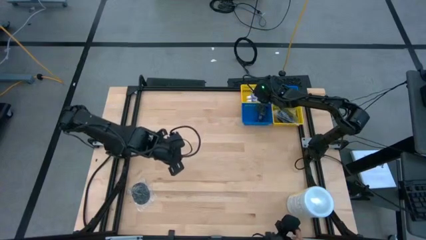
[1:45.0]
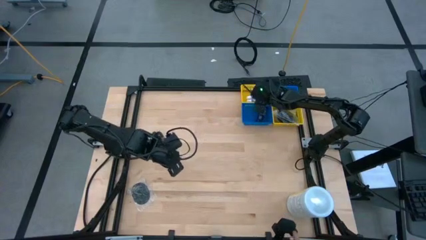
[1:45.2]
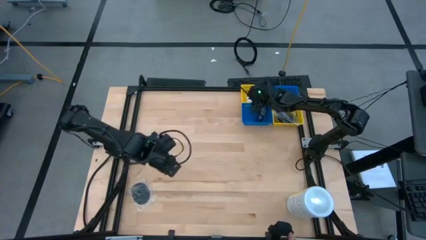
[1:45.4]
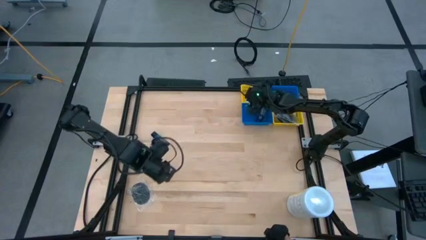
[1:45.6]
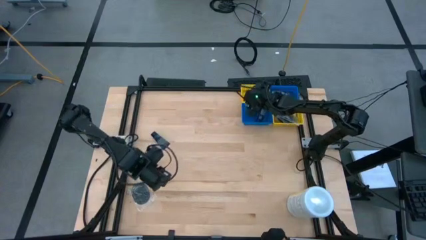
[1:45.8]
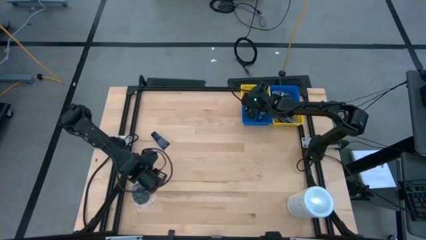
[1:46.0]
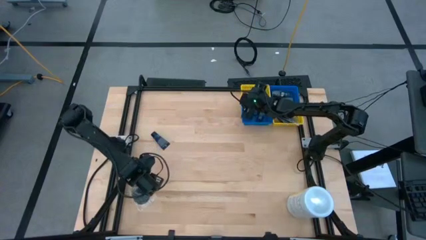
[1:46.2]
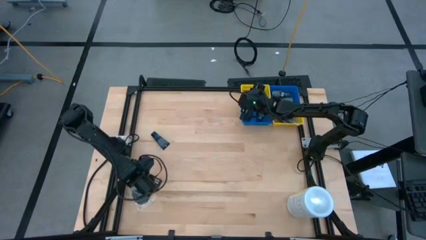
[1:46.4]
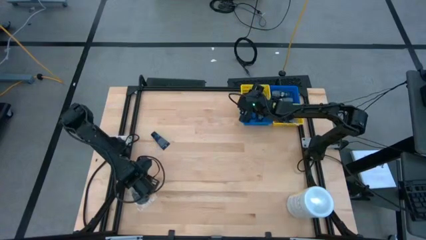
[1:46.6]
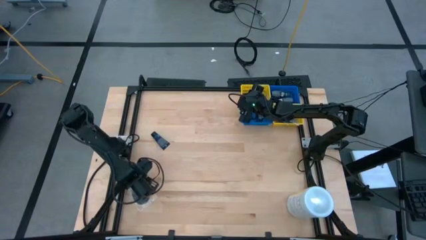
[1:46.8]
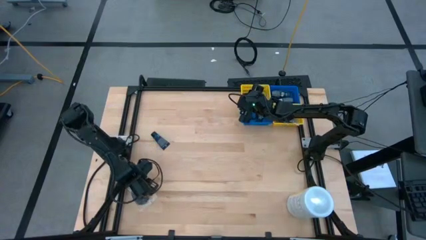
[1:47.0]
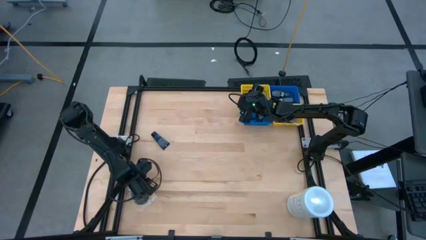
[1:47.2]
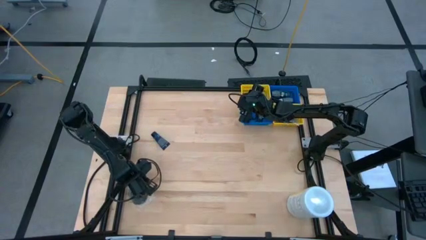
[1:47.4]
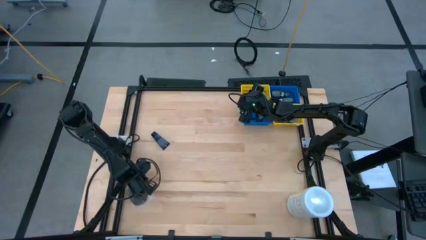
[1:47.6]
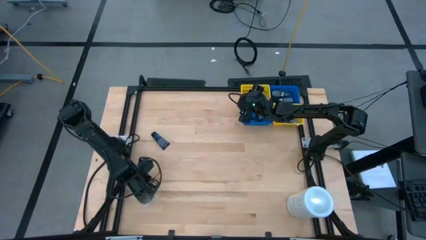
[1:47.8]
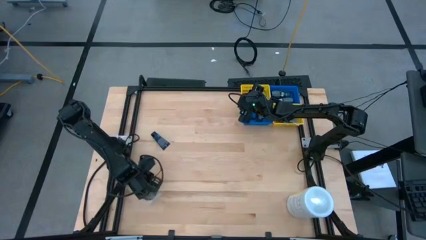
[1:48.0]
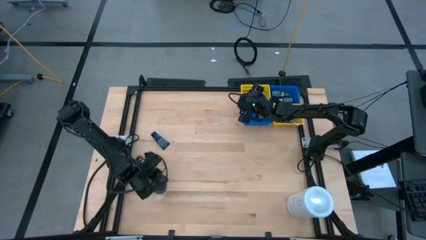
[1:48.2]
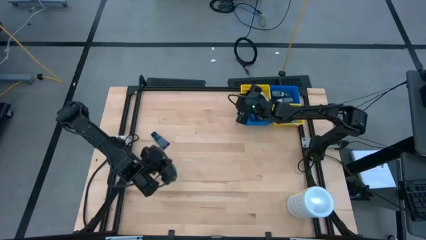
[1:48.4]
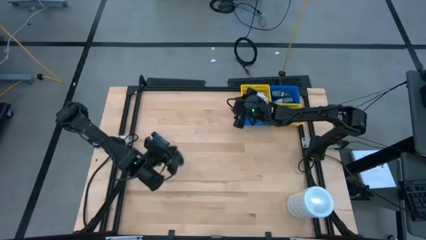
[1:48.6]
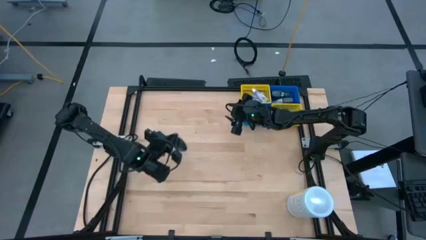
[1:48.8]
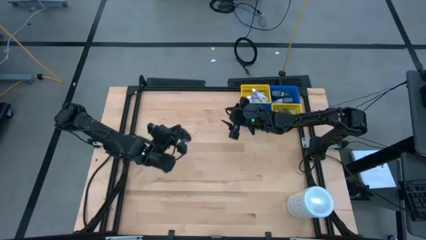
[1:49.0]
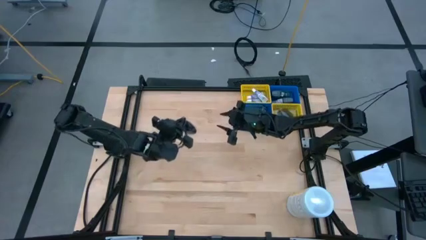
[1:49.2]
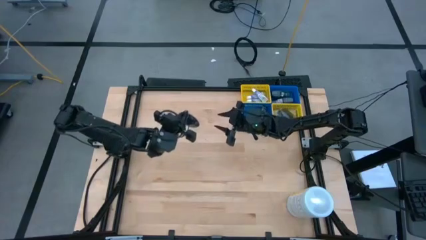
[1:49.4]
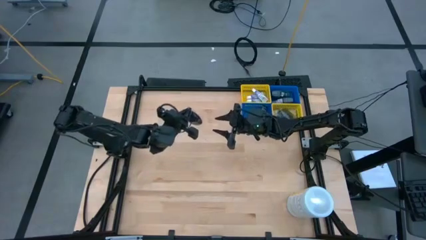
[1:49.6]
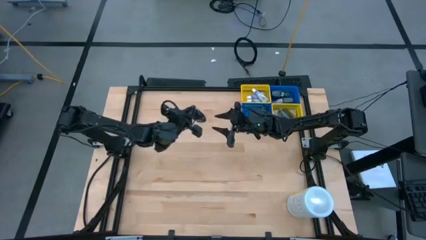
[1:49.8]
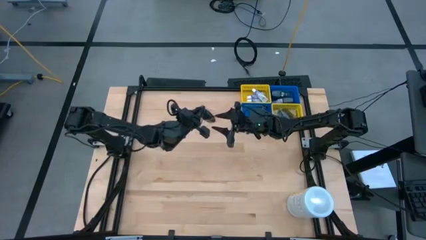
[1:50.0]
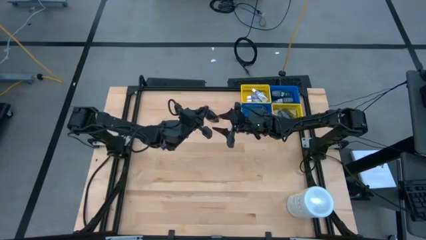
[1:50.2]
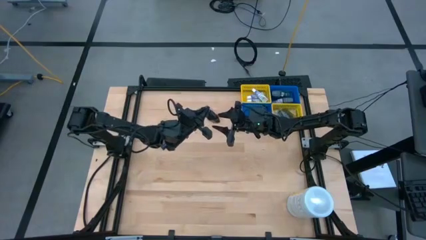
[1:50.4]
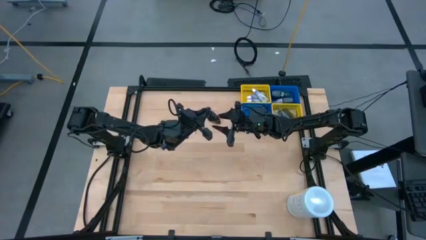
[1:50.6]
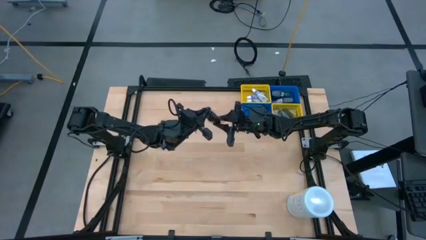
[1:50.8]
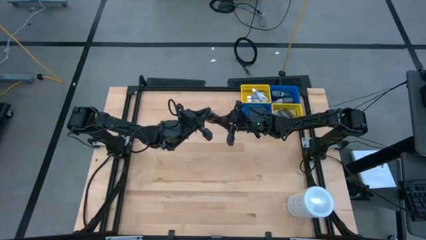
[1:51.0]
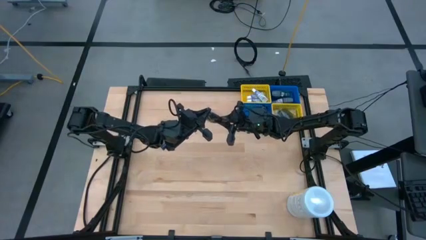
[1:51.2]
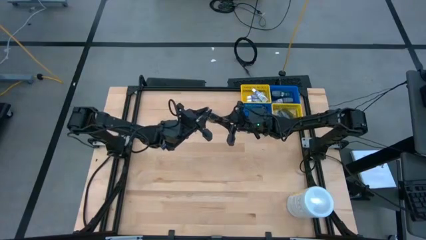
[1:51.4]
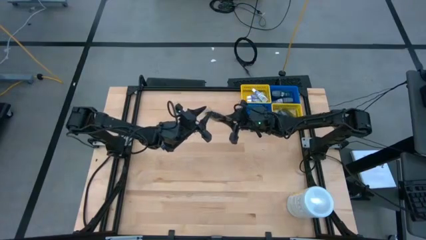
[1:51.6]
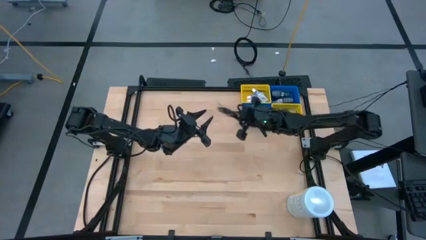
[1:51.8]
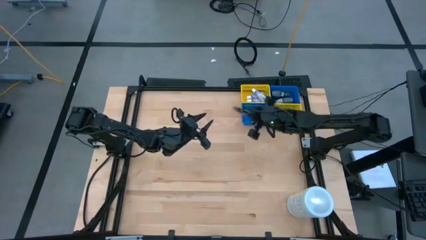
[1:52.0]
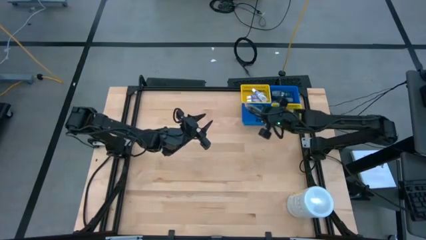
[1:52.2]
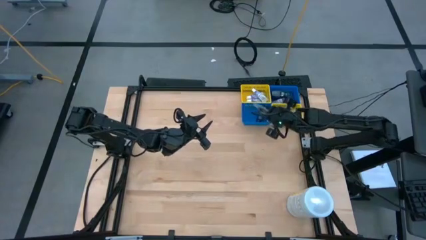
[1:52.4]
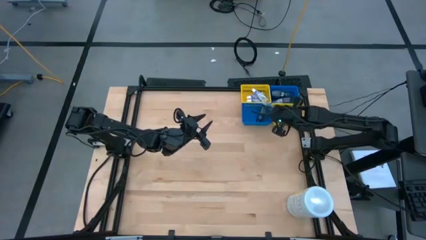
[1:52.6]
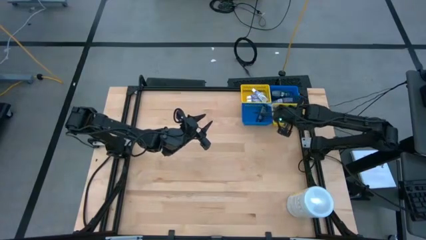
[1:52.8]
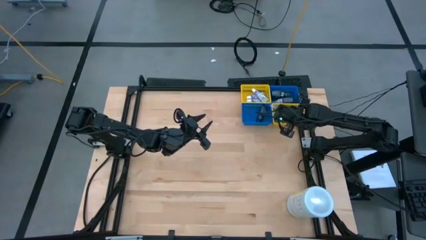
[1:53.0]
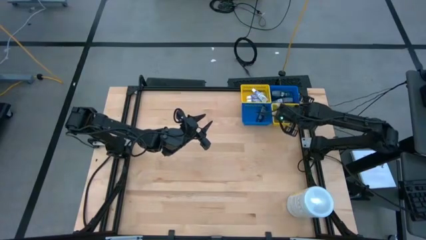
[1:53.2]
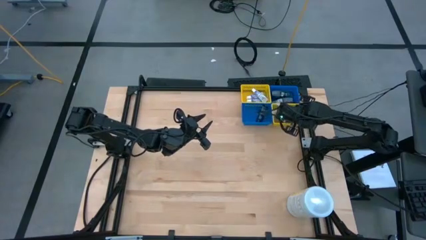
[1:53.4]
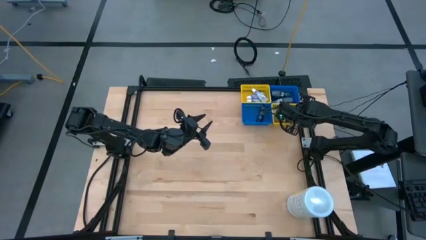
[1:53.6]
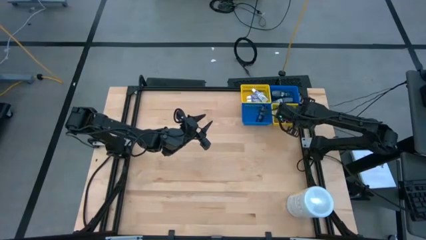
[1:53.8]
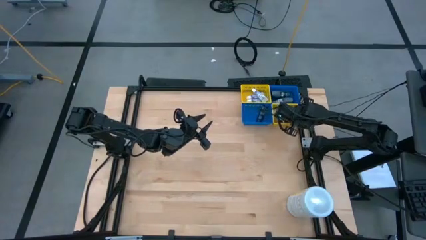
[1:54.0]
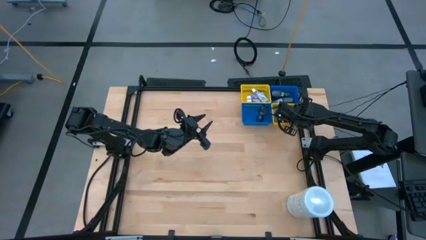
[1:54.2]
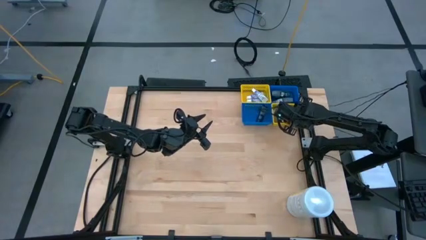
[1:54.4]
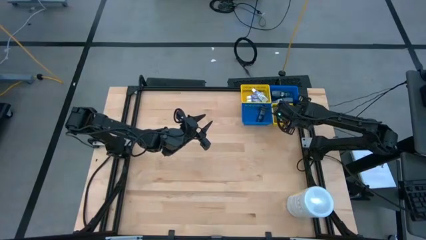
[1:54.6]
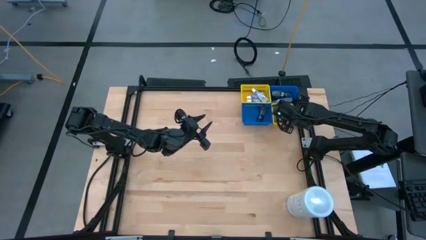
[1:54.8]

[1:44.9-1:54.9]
Task: Pick & Place Travel size toiletries
Put the black hairbrush into the right yellow basket
